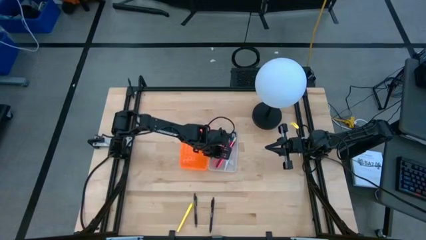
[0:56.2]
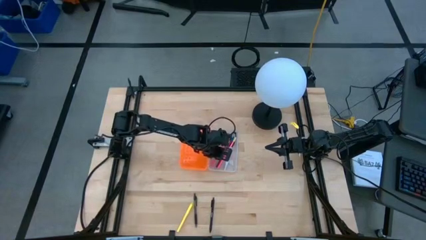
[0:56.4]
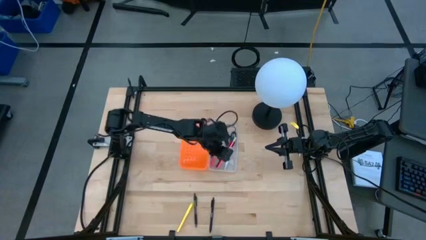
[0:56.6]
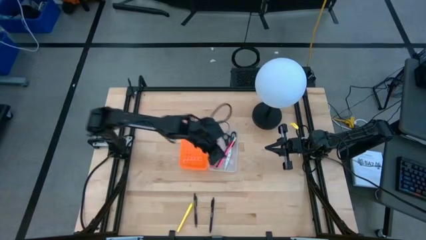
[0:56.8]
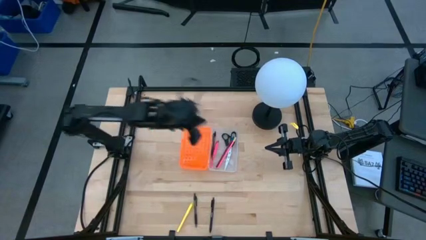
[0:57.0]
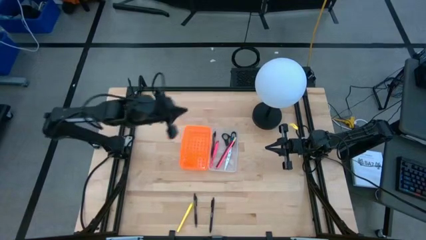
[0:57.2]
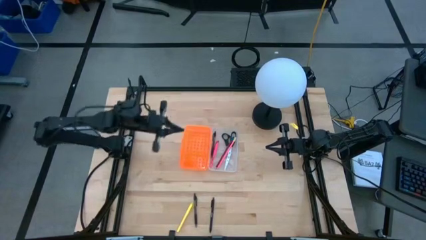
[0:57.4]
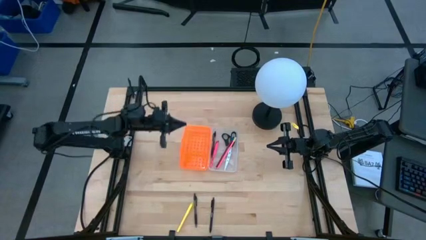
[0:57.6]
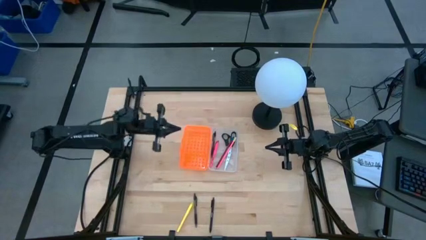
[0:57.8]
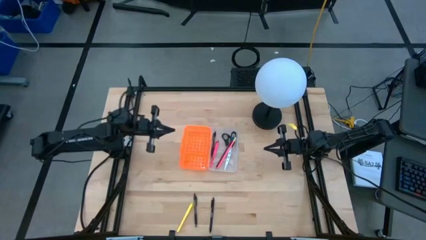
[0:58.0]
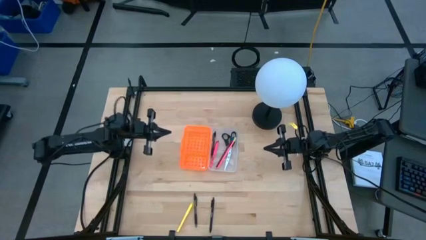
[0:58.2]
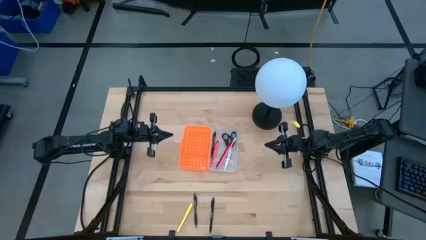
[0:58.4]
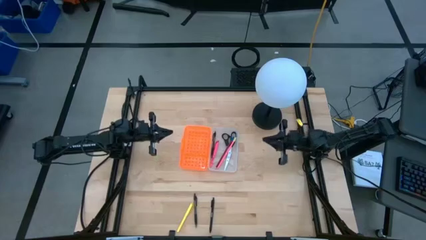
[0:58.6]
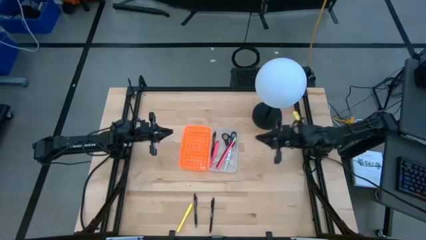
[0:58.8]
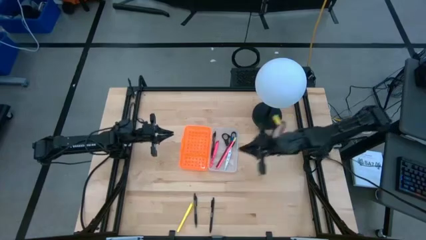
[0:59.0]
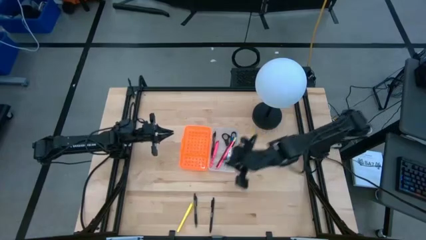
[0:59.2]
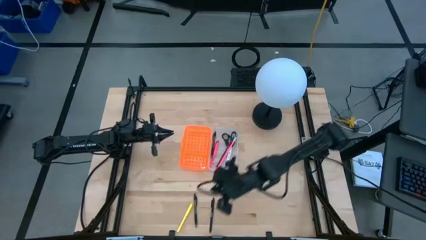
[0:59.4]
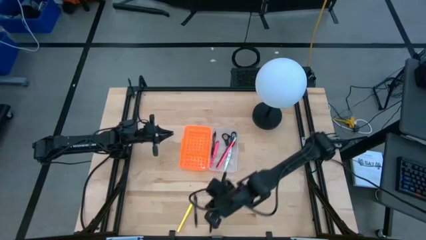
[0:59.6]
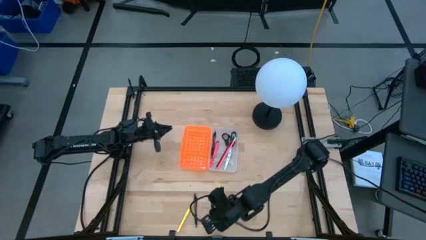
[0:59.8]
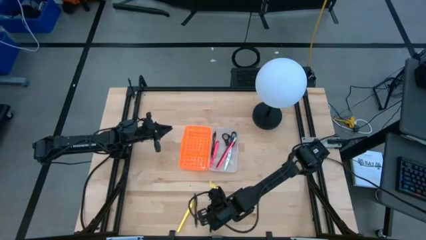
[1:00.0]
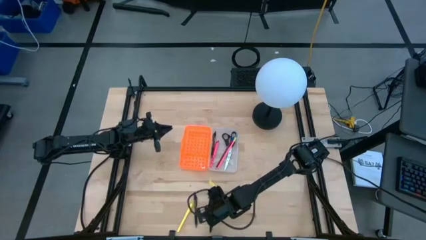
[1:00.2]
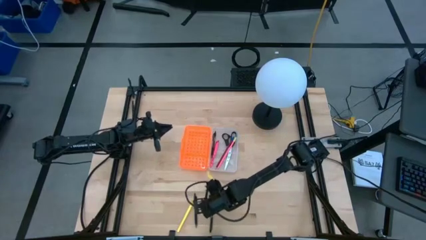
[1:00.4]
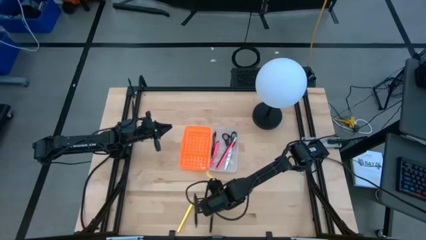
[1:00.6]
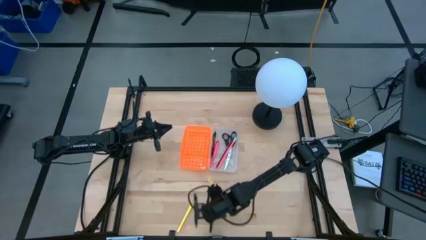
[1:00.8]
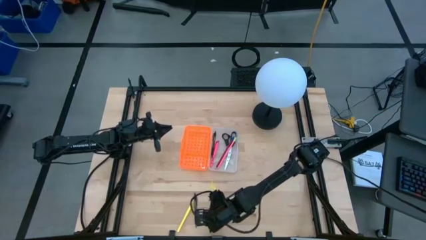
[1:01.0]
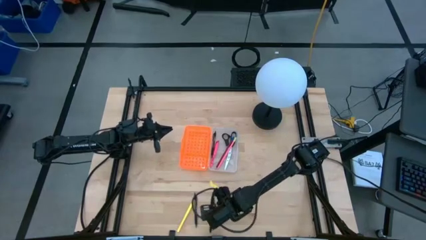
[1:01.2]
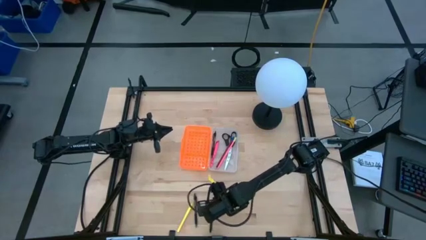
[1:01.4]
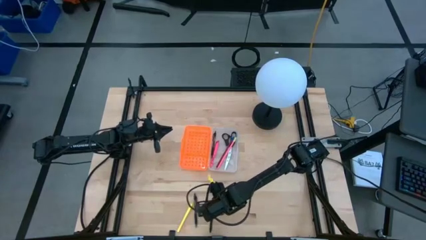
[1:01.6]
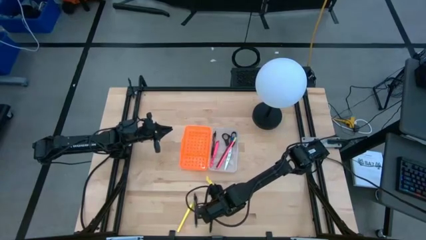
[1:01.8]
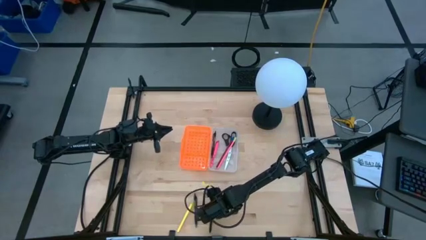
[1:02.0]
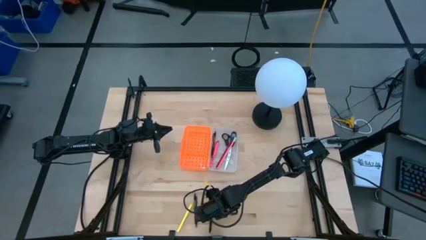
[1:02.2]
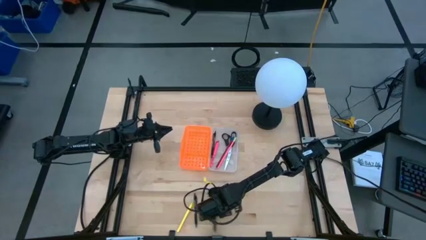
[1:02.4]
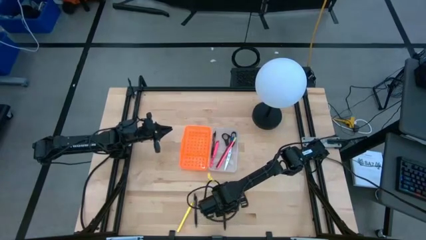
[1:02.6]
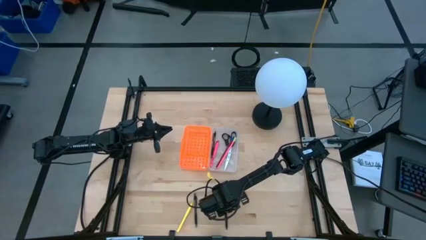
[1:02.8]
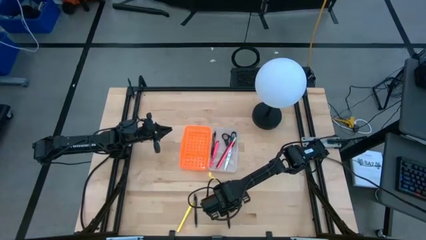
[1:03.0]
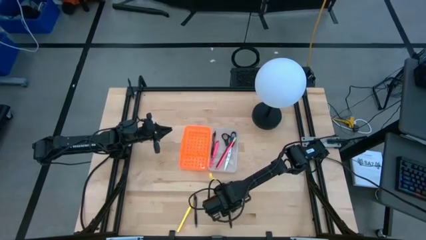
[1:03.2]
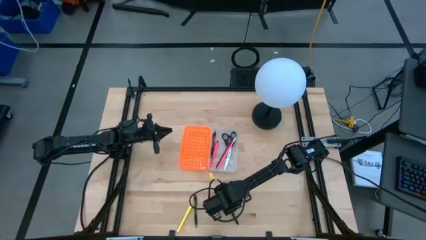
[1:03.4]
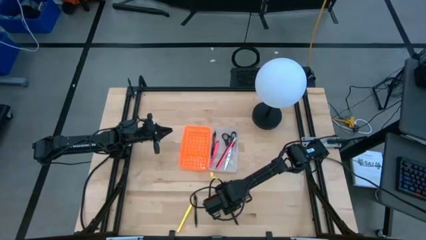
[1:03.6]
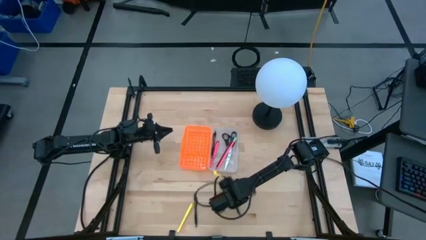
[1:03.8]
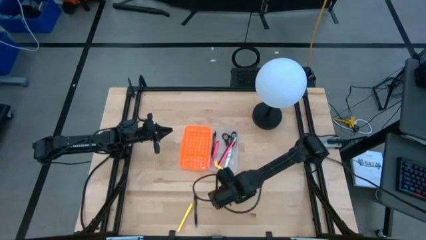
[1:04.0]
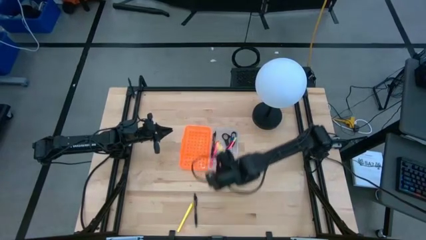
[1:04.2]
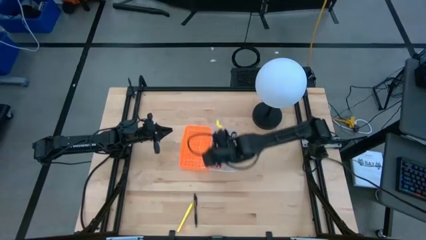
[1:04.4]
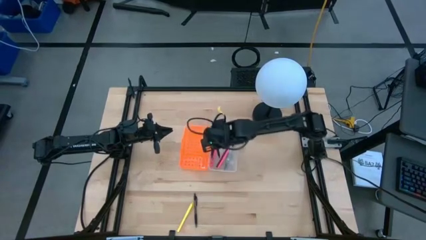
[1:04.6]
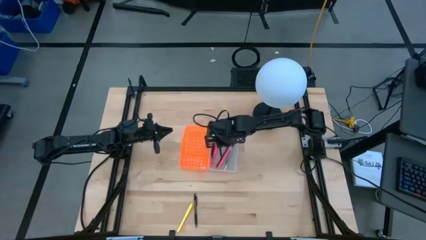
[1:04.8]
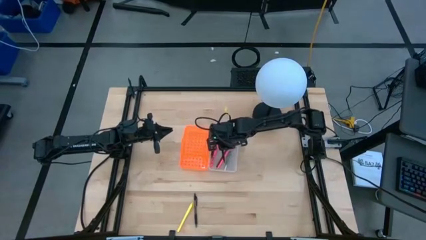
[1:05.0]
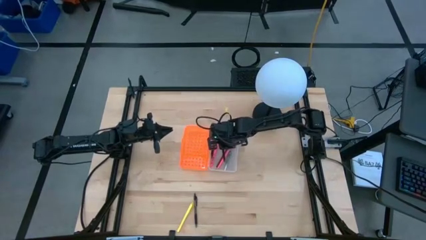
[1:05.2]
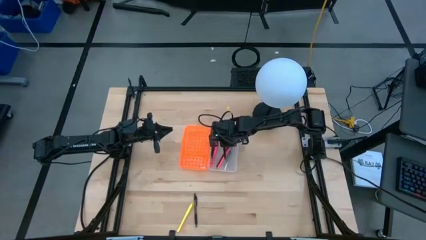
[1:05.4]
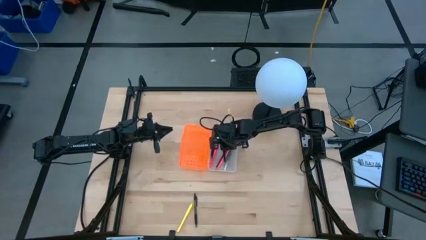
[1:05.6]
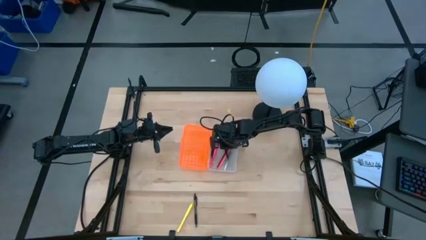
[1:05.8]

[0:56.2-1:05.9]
Task: Pick & place school supplies into a supply box
Put the right black pen into the orange box

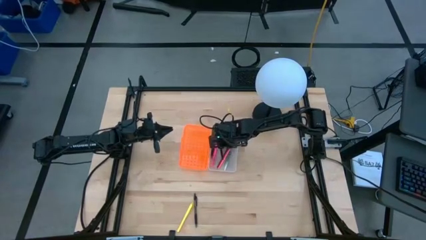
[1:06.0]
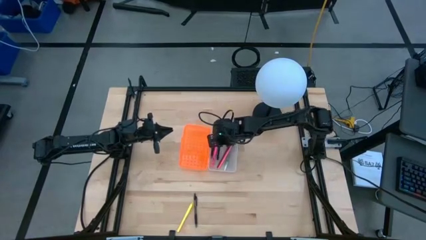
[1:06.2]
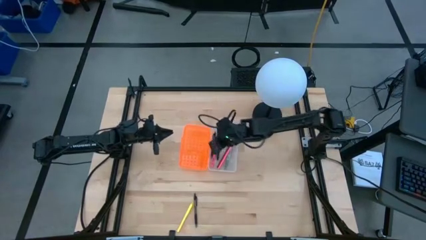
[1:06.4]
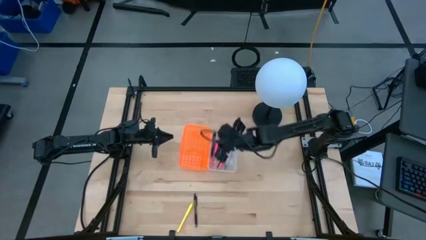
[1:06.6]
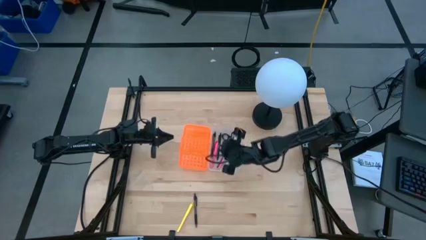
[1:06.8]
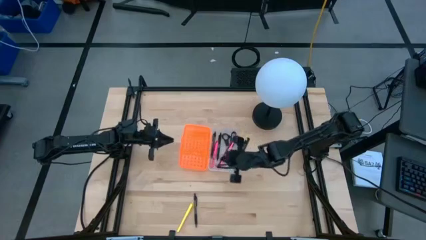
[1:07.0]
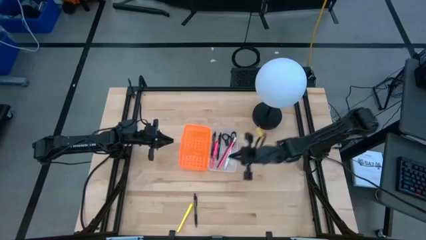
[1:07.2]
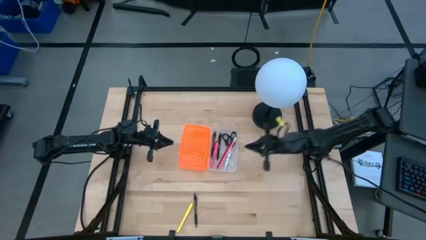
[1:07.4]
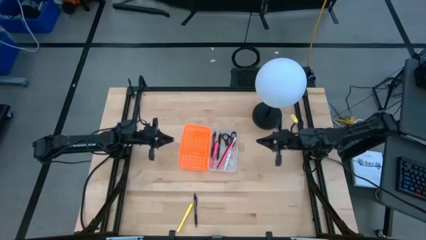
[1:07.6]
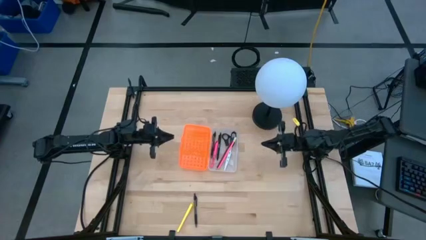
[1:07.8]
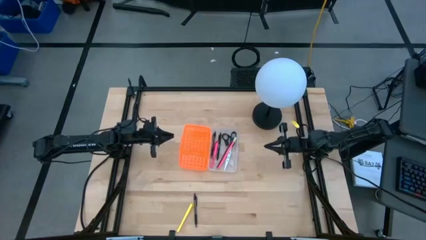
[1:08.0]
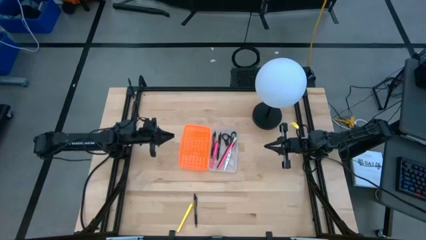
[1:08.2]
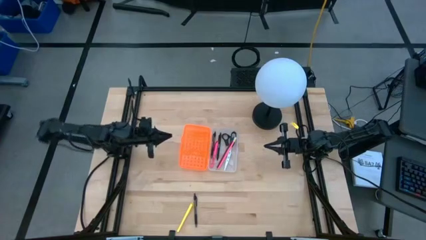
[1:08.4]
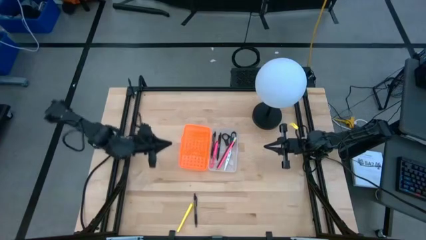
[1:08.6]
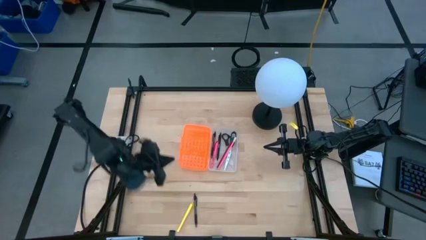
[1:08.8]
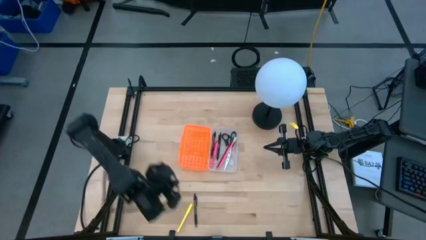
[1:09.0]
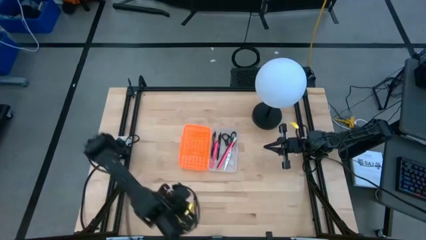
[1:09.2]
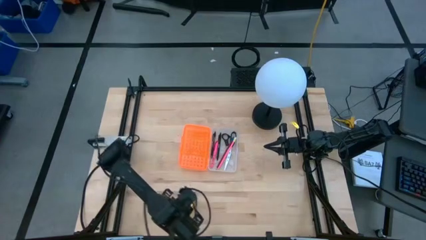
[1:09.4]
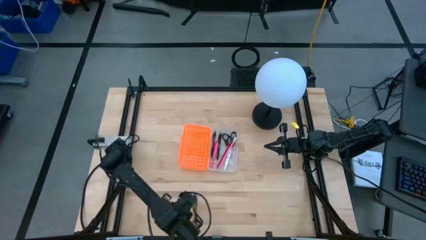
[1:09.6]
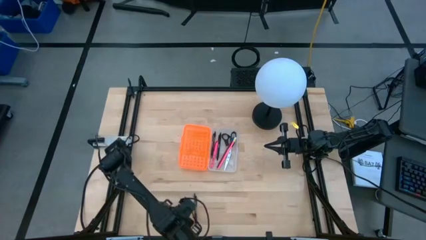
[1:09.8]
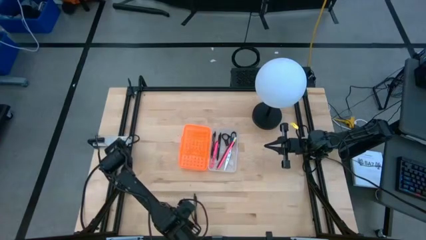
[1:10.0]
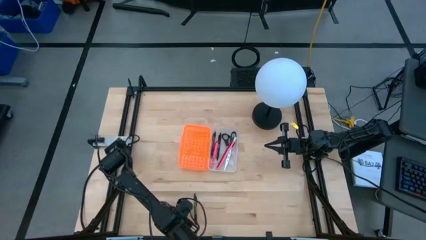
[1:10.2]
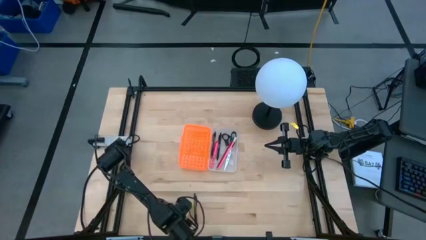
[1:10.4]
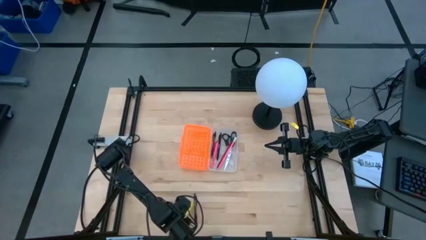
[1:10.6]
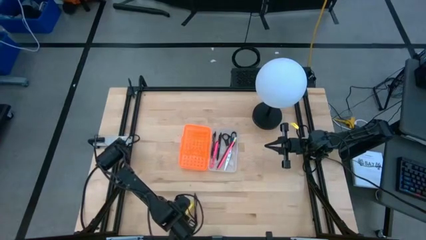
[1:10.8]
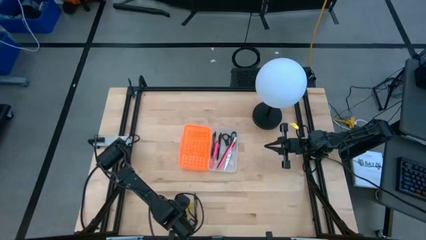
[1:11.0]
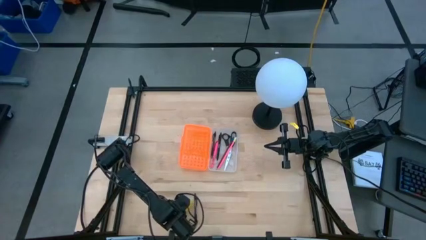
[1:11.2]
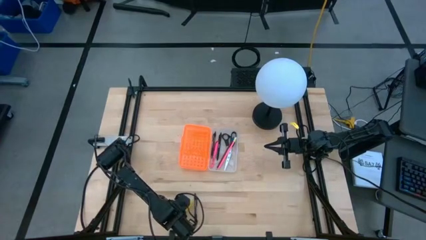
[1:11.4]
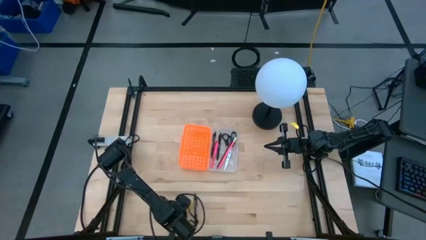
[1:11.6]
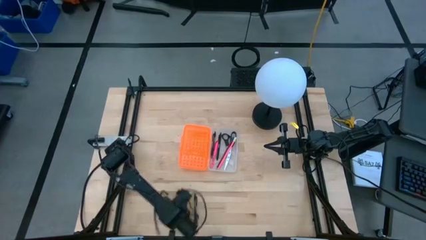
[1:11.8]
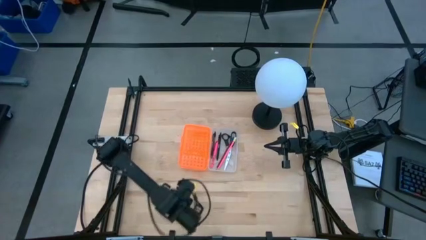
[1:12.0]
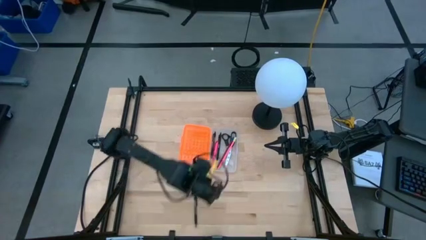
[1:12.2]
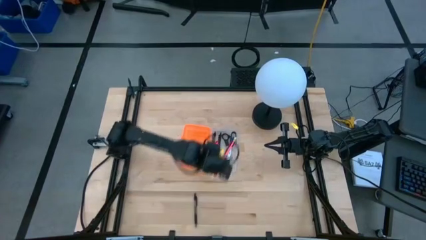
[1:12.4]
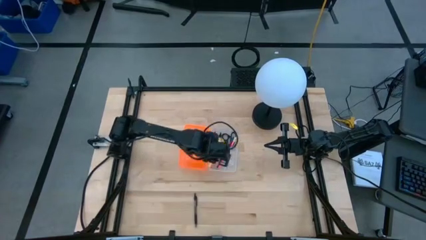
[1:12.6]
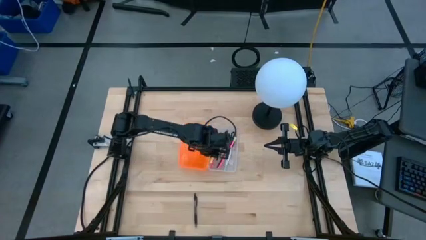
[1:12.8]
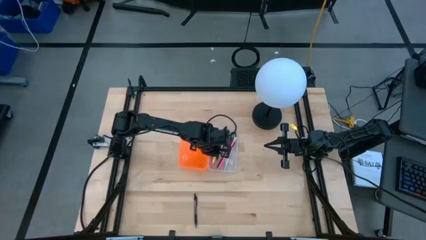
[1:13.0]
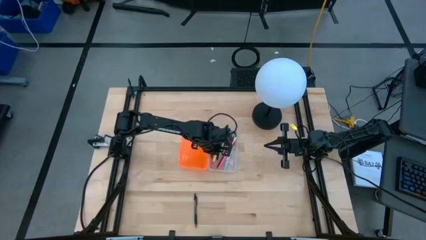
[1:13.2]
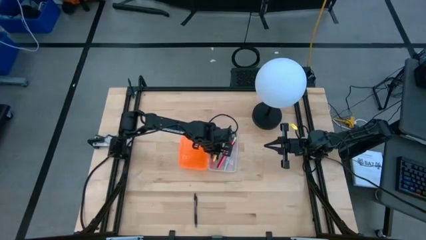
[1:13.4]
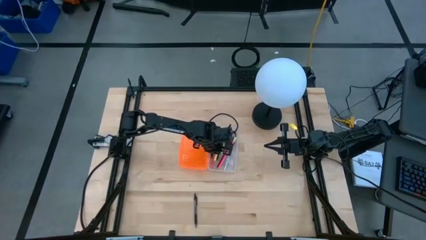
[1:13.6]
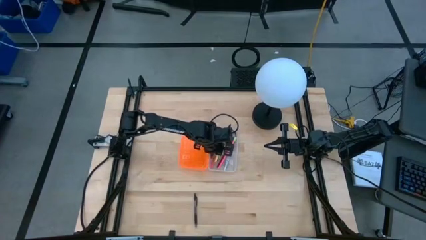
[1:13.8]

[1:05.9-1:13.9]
Put the yellow pen into the orange box
